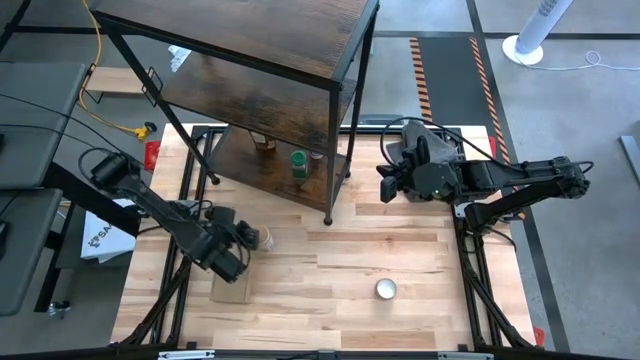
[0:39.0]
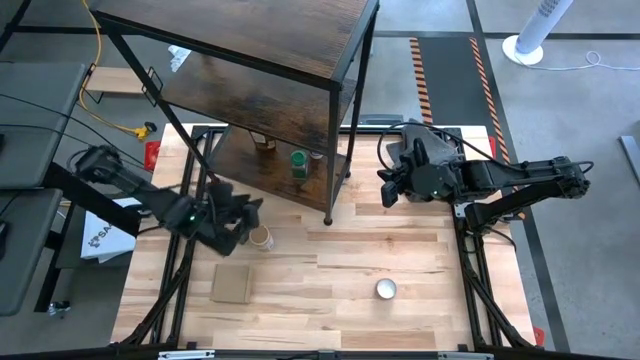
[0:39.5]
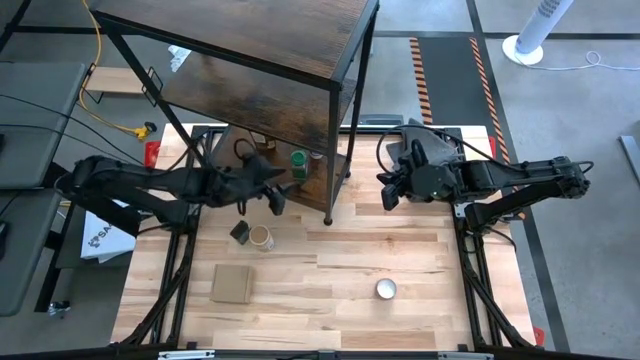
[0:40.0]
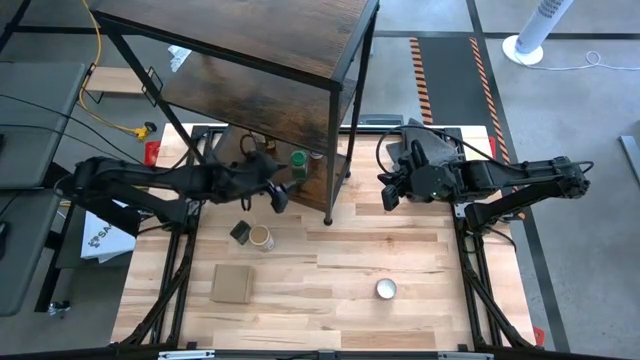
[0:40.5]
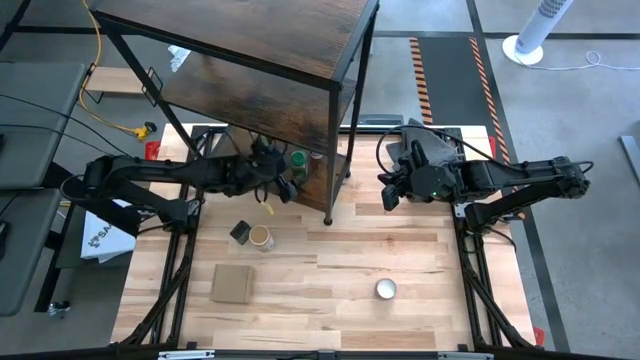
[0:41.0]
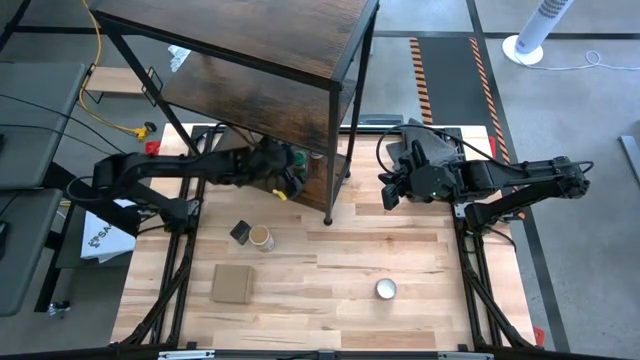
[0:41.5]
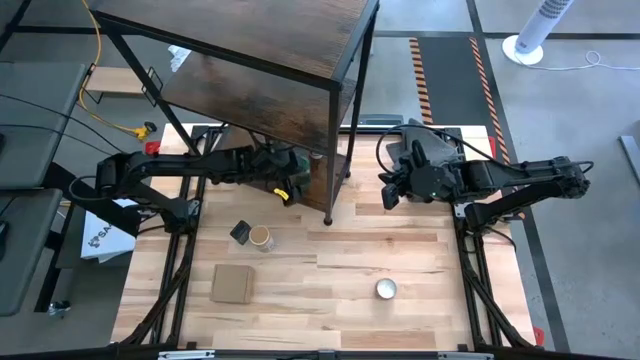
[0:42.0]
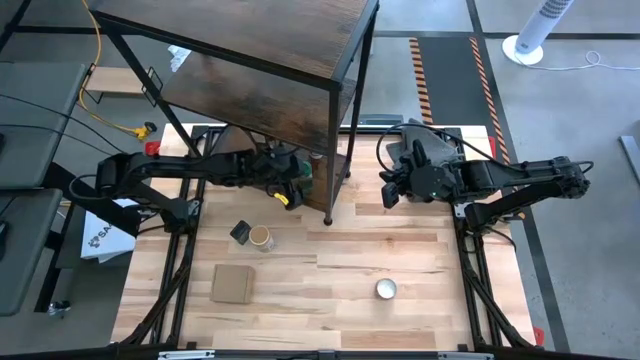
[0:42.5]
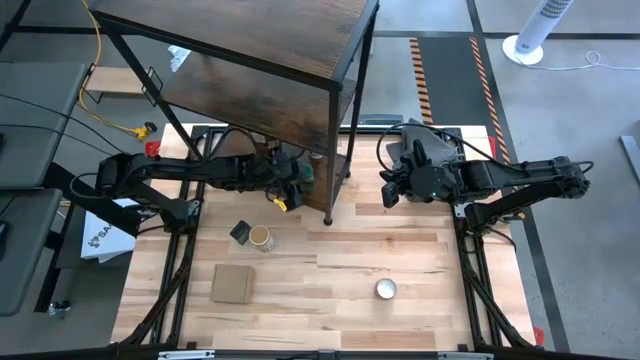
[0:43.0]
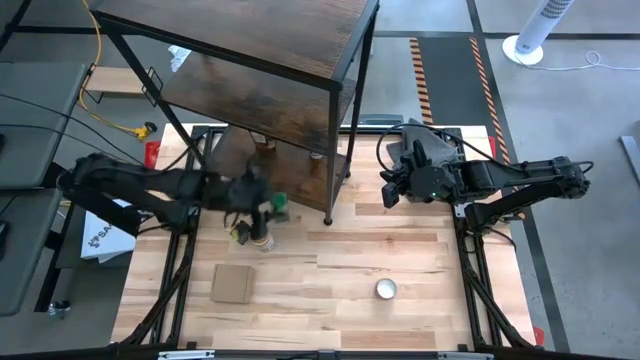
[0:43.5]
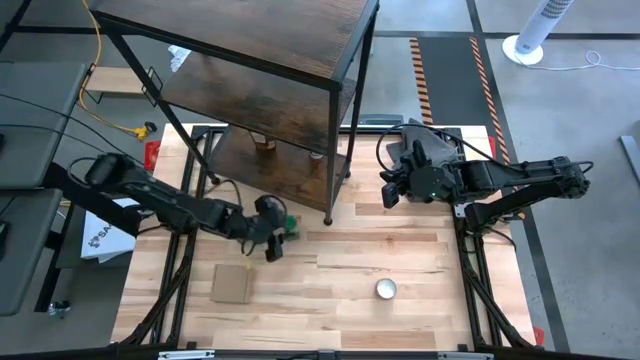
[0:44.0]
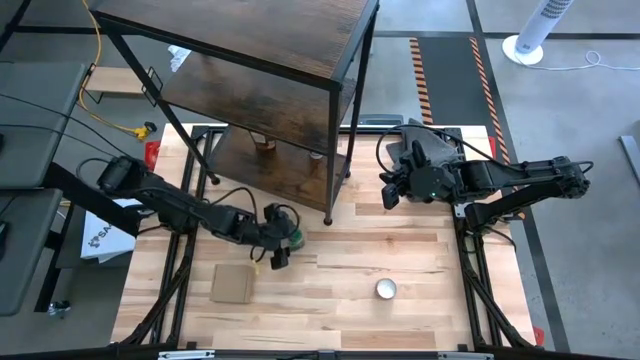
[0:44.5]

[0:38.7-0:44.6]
Task: Shelf spices
Remove the green seasoning bottle from the shelf

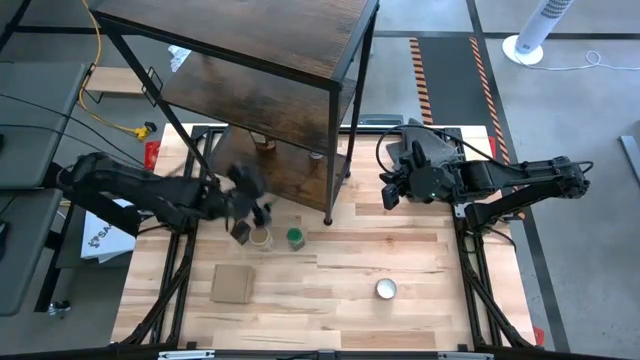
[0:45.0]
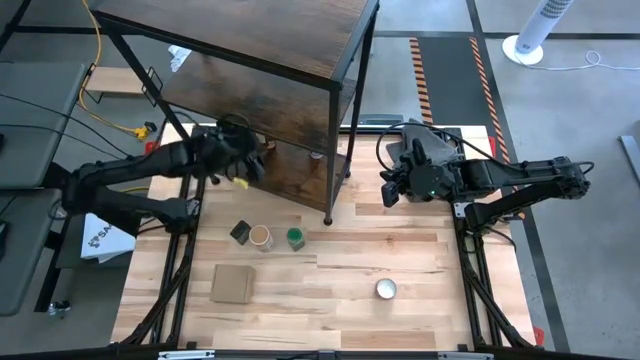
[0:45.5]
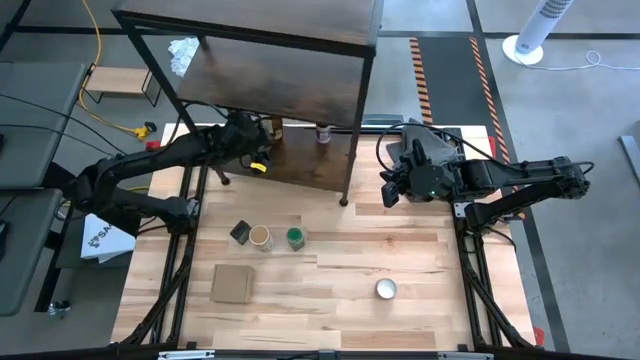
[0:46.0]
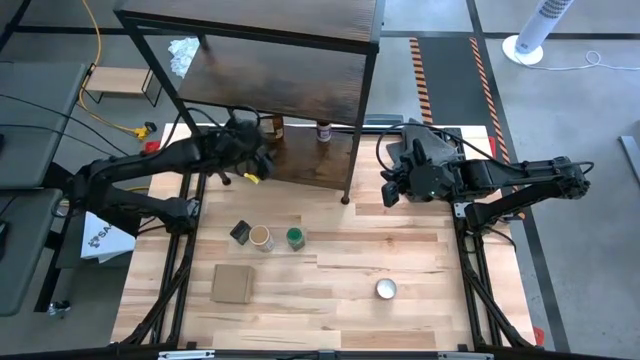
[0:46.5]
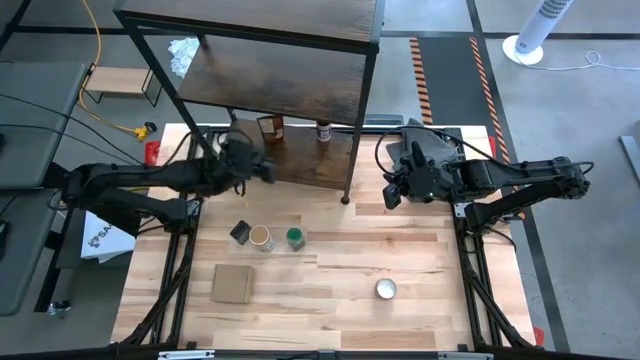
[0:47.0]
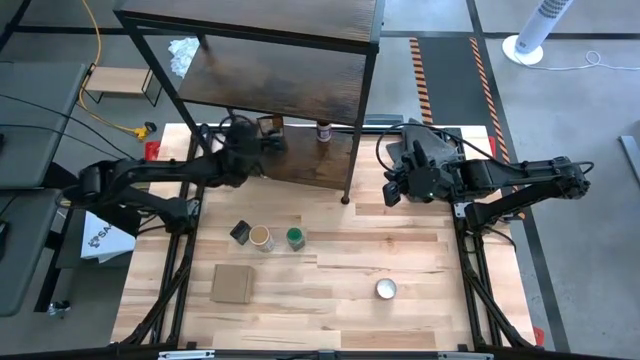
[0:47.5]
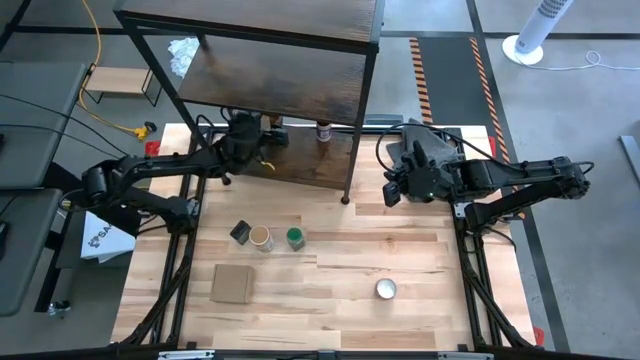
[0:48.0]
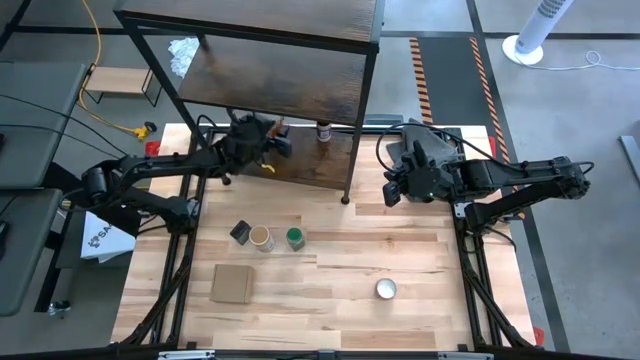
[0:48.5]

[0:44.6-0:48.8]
Remove the orange seasoning pack from the shelf

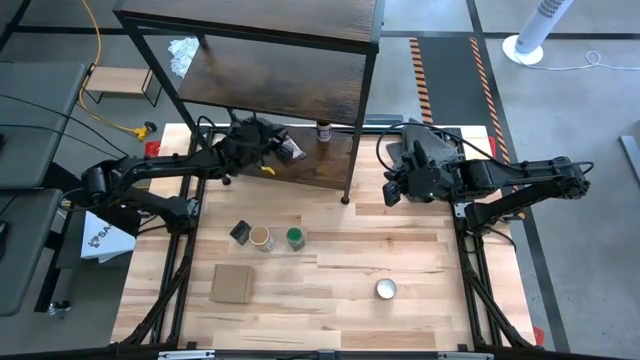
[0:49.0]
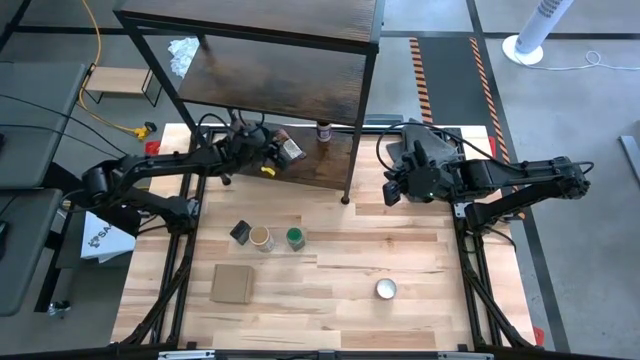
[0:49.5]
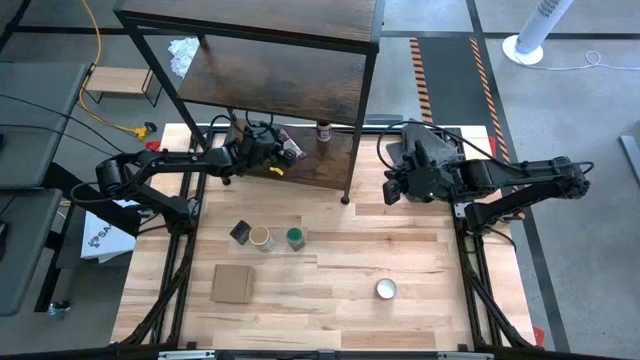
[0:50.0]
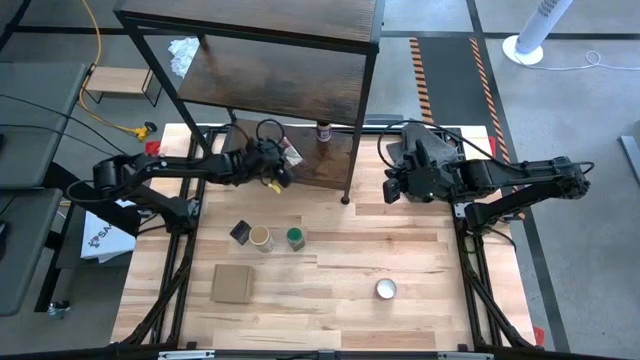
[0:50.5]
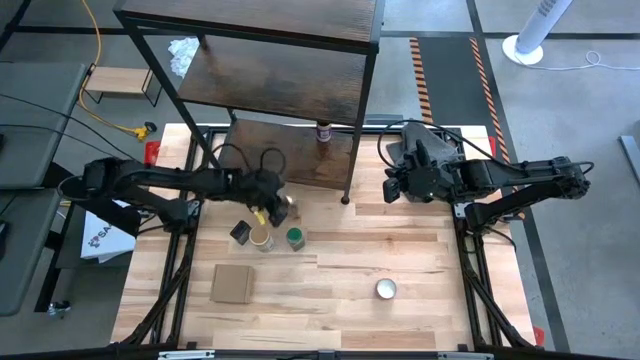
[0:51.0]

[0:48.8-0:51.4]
Remove the orange seasoning pack from the shelf

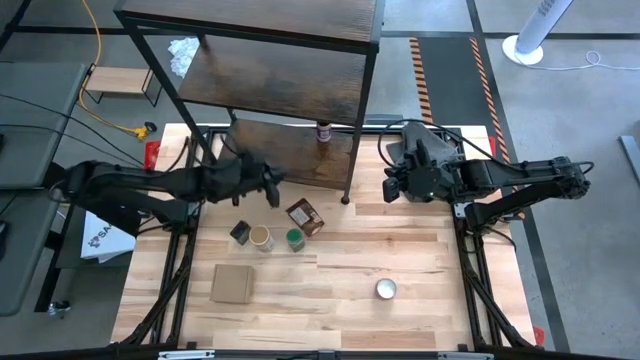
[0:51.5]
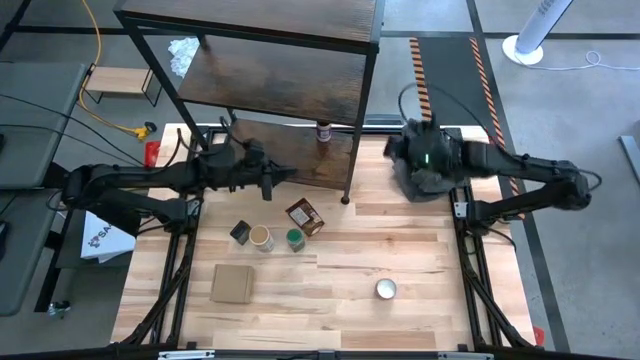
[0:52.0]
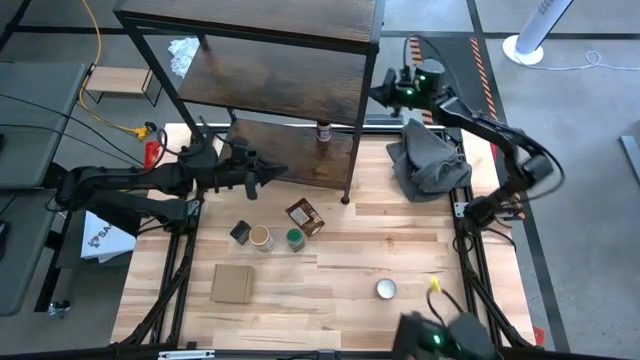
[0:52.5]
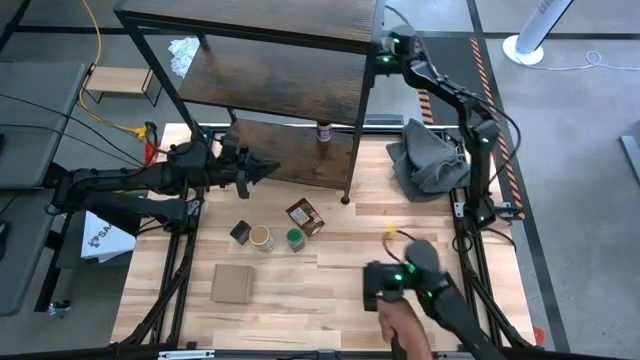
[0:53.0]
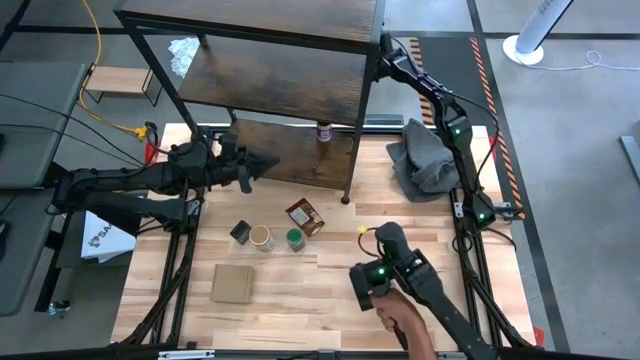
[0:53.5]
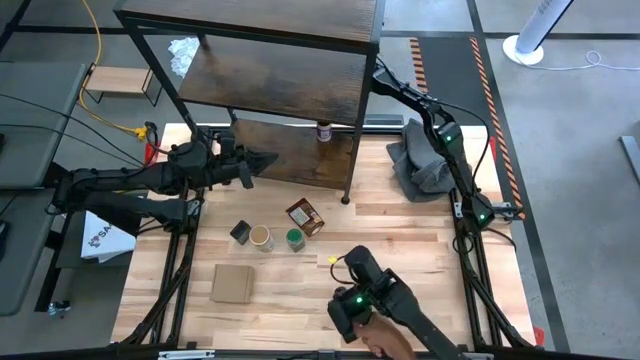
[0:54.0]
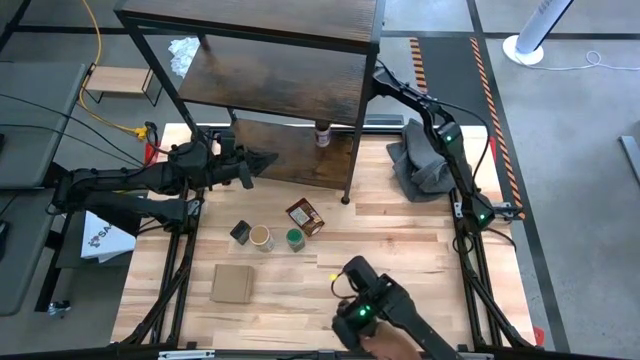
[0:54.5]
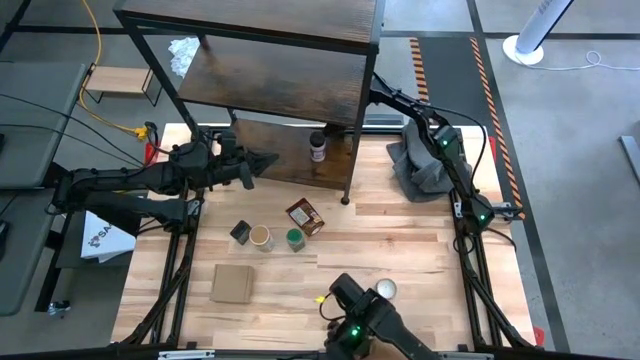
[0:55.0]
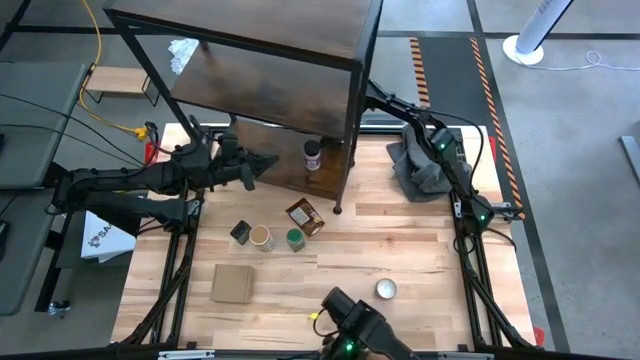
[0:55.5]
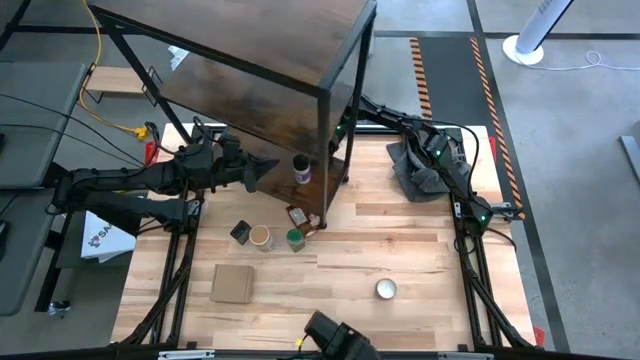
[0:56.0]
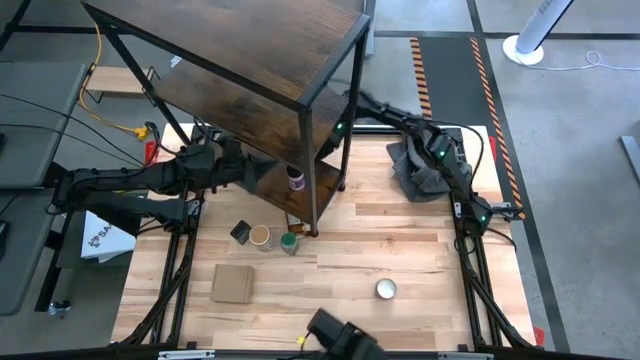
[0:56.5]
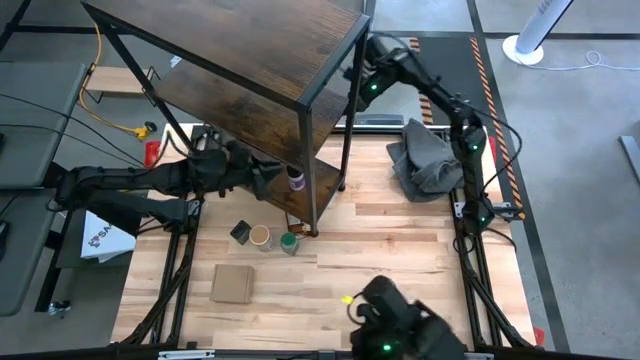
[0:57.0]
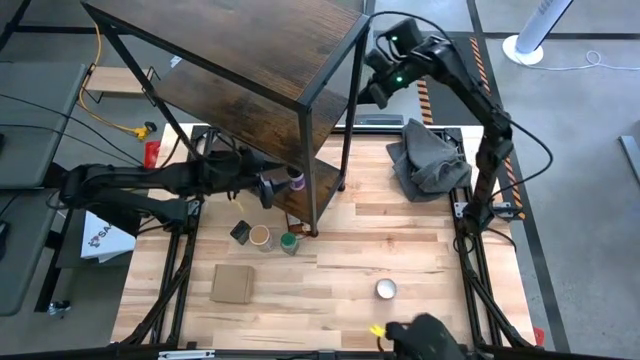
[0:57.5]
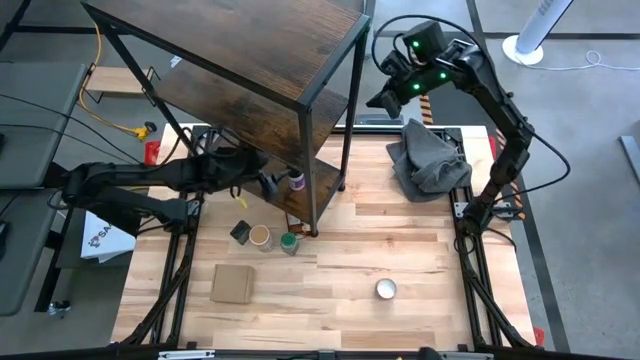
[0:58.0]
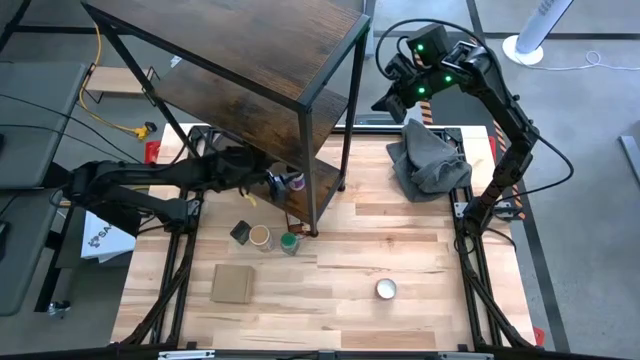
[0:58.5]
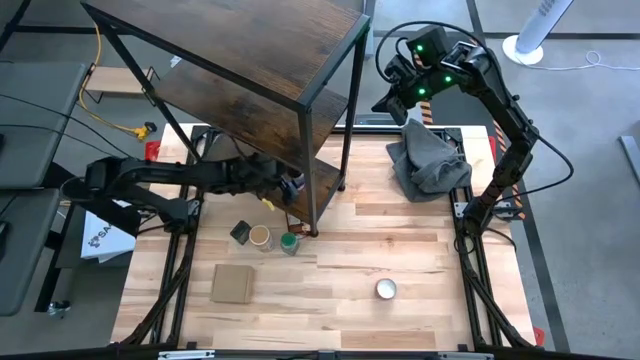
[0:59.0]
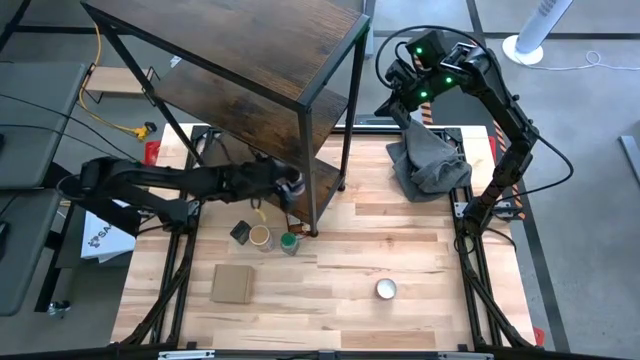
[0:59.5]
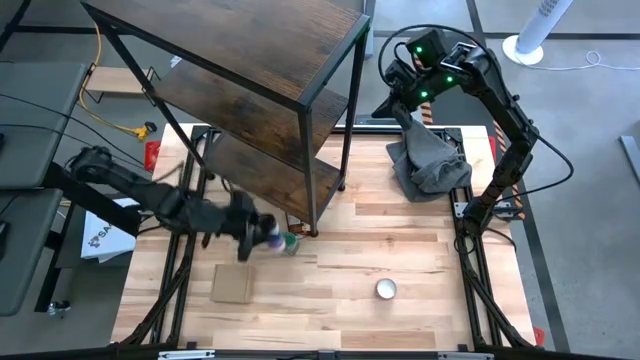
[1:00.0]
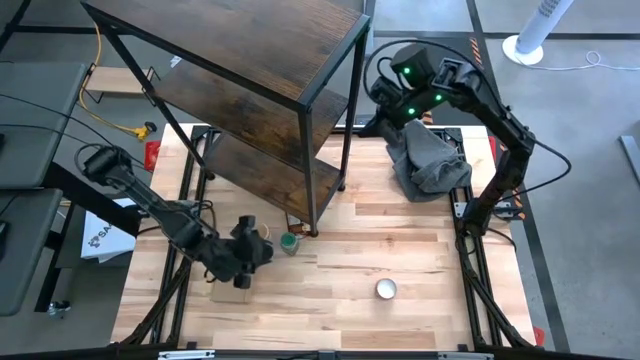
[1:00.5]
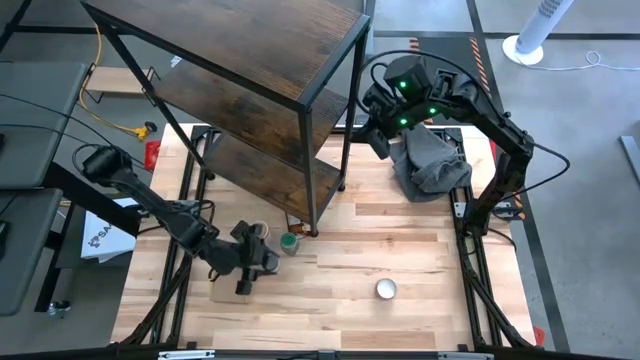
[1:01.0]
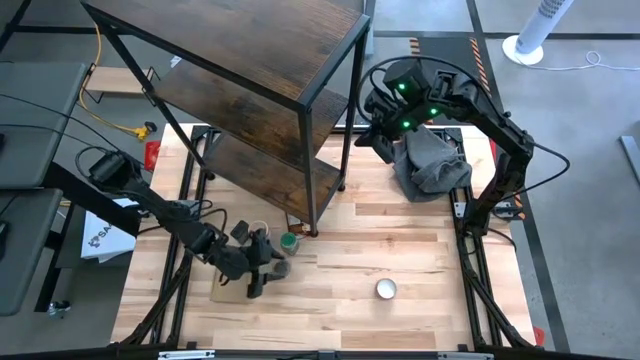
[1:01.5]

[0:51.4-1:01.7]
Remove the black seasoning bottle from the shelf
